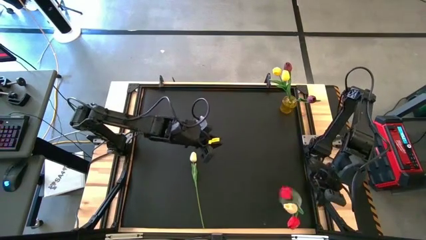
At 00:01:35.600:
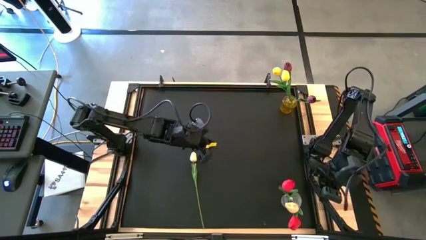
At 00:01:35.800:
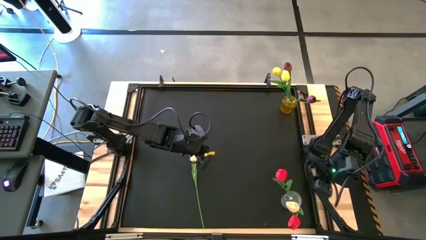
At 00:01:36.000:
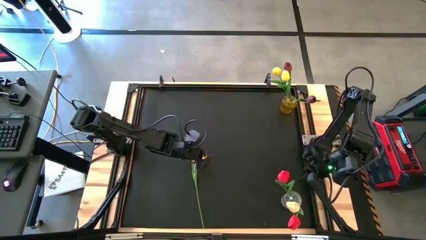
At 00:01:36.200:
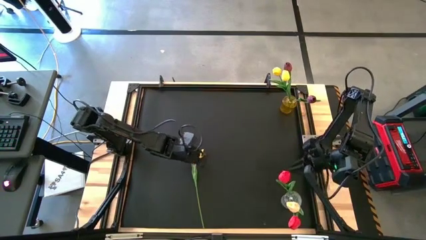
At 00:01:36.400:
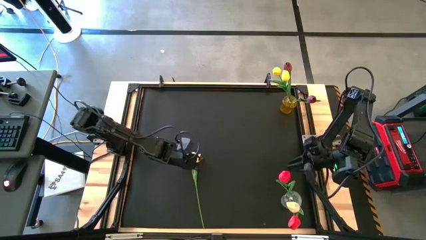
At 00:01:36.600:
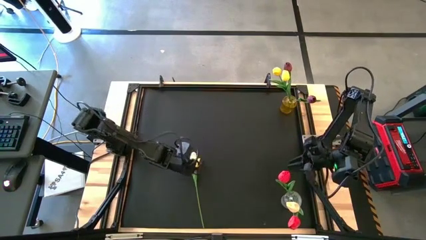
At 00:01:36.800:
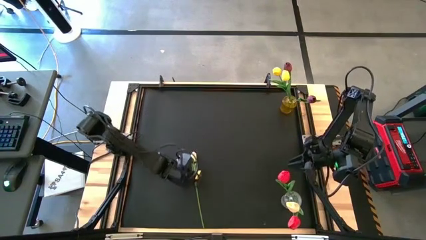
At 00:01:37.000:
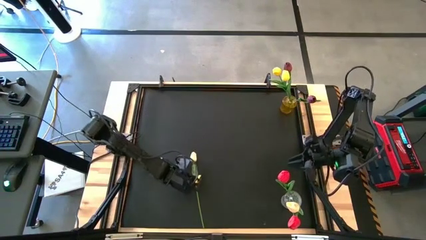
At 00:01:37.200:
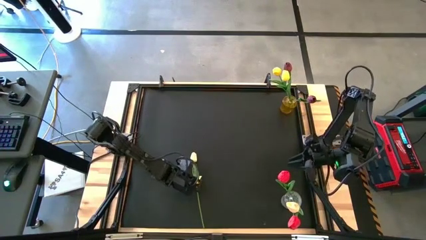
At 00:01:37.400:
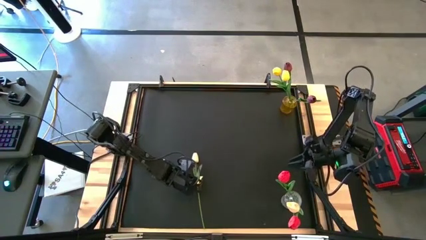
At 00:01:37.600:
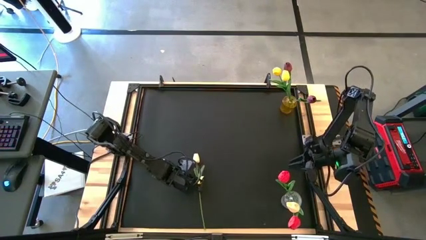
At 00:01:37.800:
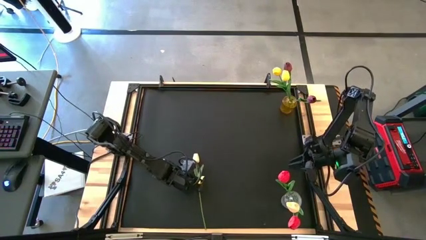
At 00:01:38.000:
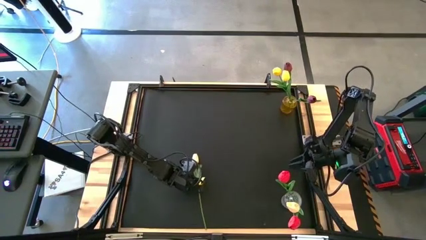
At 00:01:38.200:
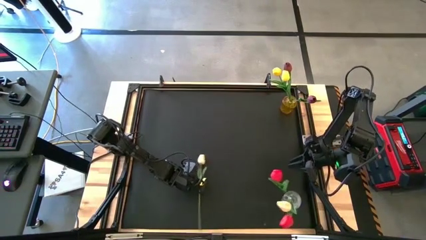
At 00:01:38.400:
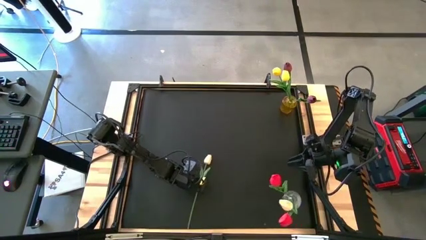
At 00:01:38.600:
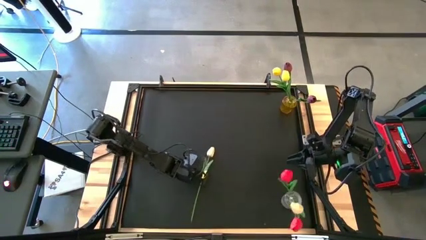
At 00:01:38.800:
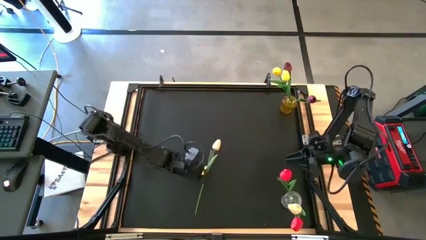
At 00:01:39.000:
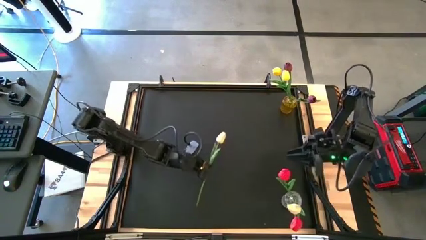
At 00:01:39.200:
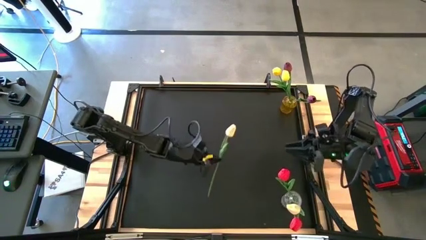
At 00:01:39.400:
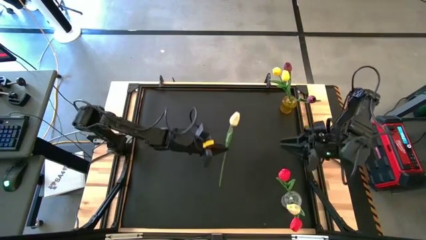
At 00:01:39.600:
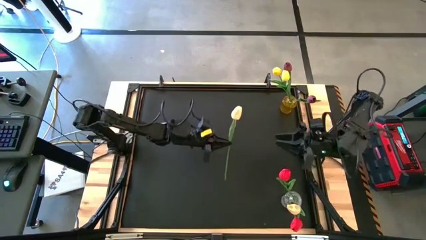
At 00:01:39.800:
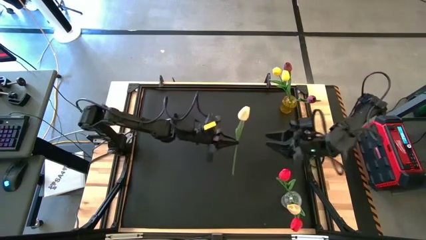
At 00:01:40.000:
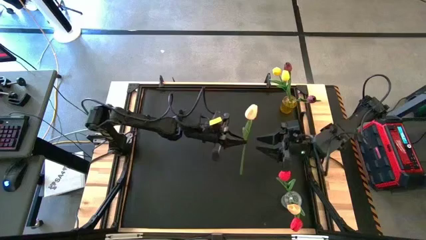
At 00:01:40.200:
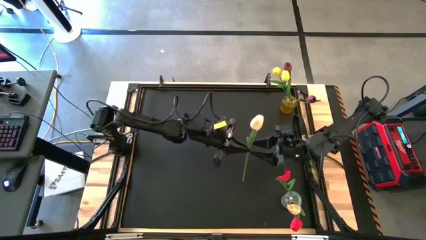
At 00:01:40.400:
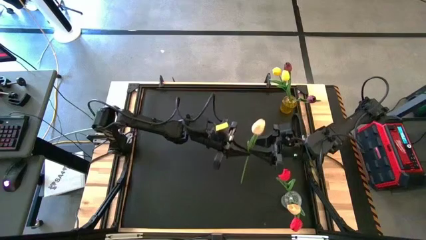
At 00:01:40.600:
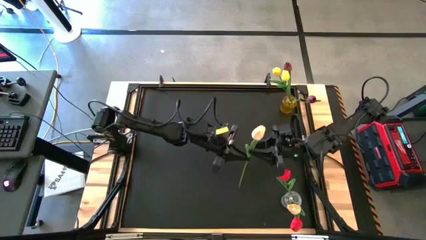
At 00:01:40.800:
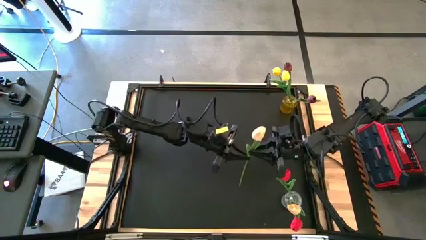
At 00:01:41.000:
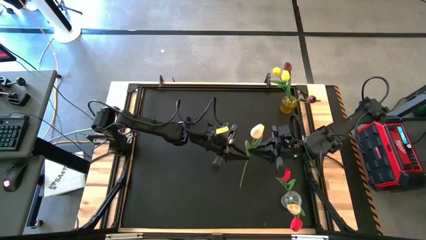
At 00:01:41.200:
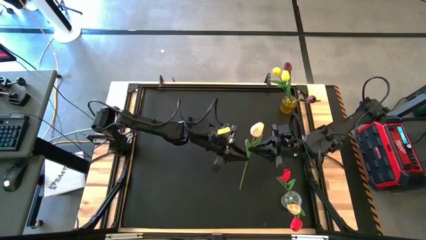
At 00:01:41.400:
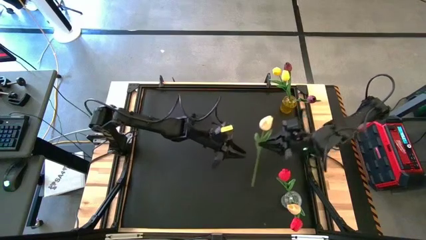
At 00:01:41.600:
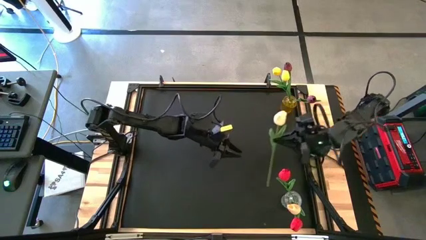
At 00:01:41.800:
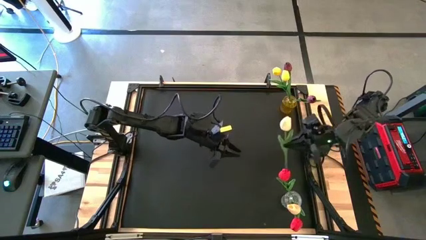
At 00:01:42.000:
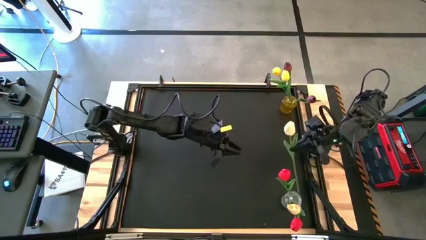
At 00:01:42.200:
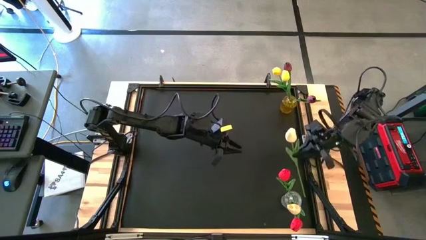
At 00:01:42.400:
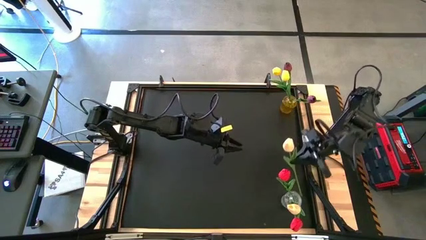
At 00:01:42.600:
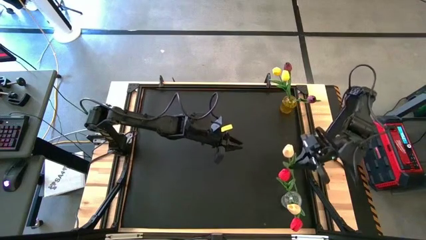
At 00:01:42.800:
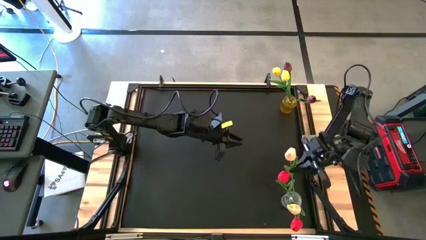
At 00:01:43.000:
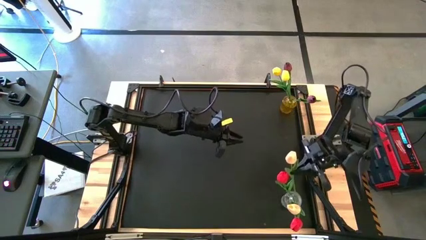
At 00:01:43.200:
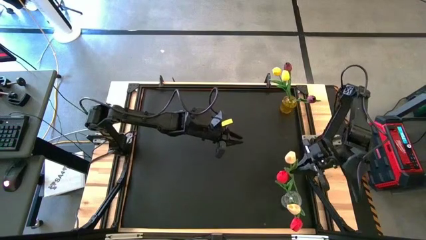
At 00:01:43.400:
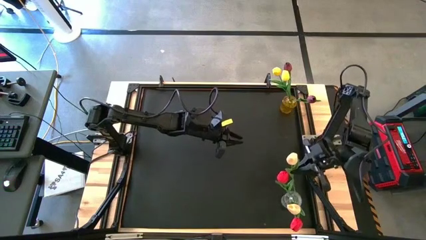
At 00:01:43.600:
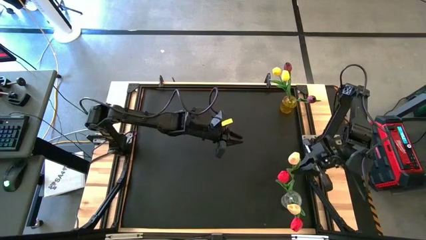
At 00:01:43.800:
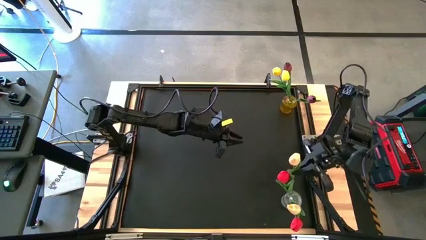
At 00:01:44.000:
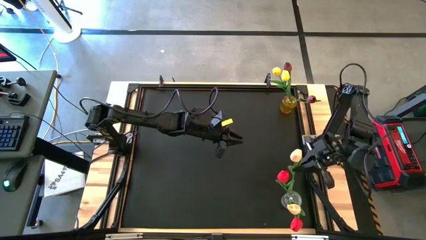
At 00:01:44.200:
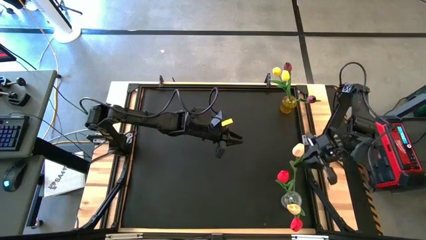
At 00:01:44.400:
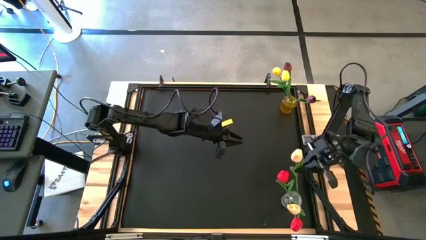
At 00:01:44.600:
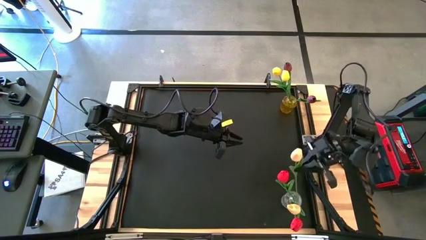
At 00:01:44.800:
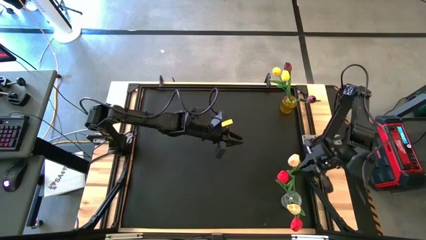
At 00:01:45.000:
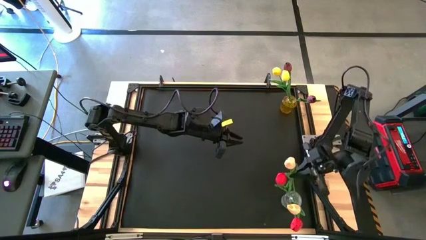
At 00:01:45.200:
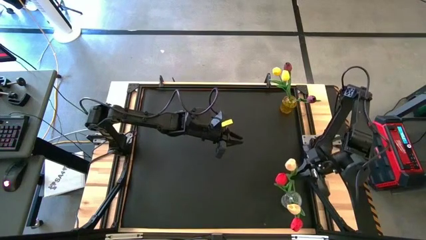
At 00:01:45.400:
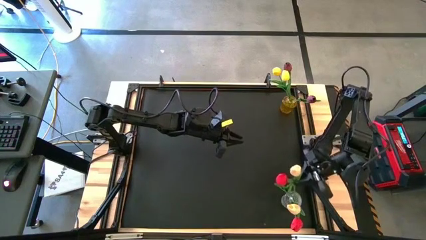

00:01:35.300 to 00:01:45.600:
Task: Sort flowers into vase by color
Put the white flower into the transparent vase

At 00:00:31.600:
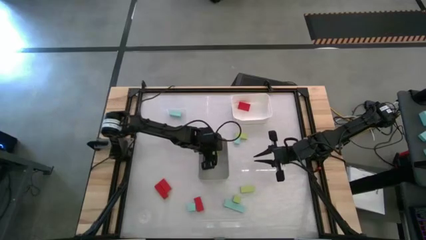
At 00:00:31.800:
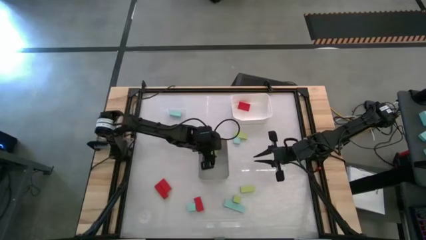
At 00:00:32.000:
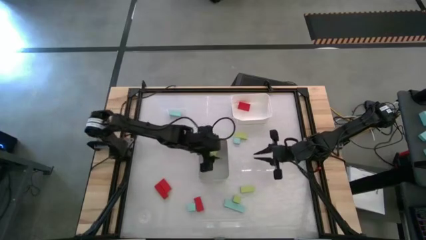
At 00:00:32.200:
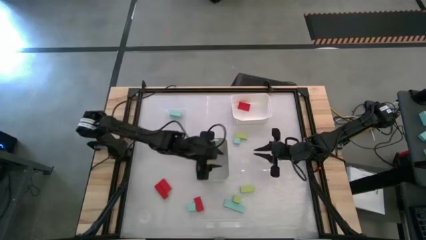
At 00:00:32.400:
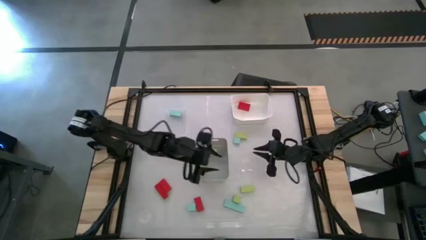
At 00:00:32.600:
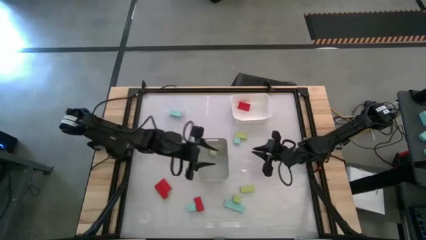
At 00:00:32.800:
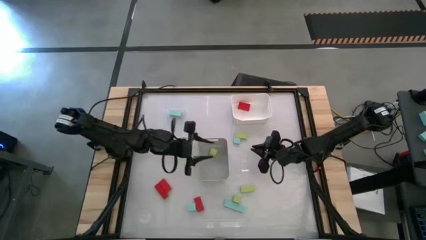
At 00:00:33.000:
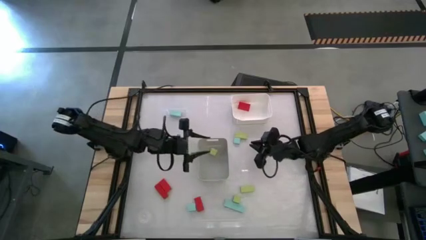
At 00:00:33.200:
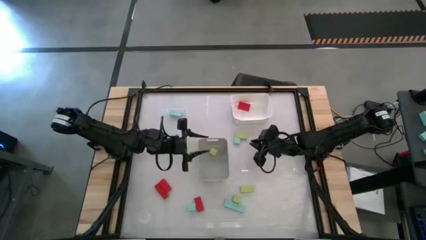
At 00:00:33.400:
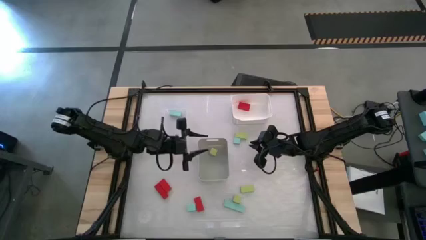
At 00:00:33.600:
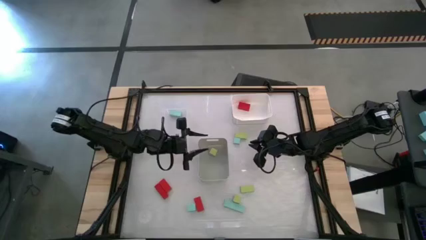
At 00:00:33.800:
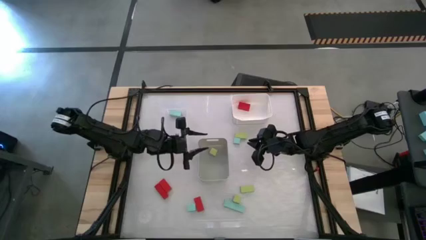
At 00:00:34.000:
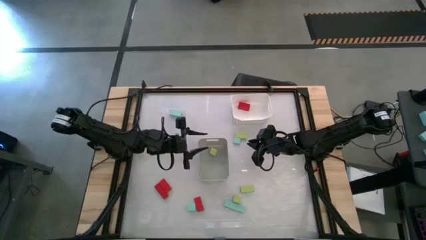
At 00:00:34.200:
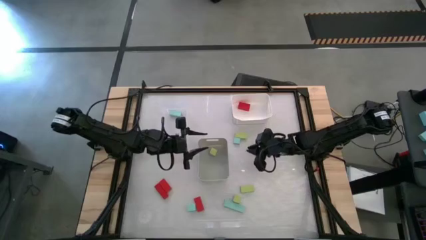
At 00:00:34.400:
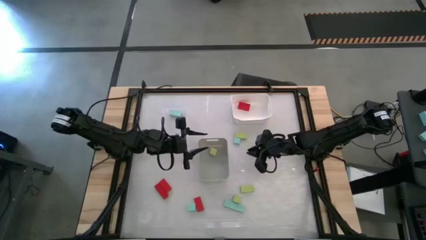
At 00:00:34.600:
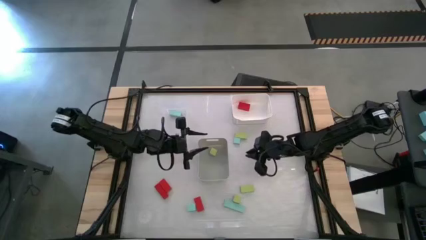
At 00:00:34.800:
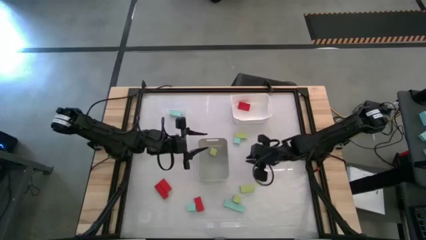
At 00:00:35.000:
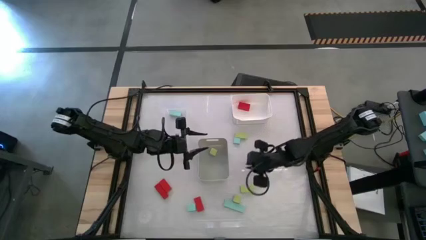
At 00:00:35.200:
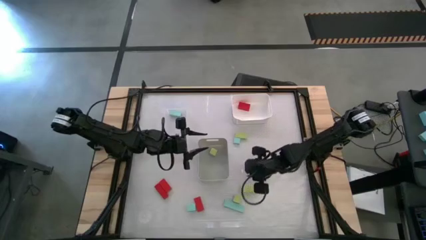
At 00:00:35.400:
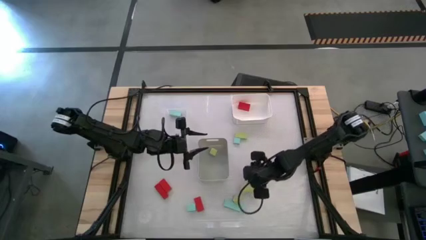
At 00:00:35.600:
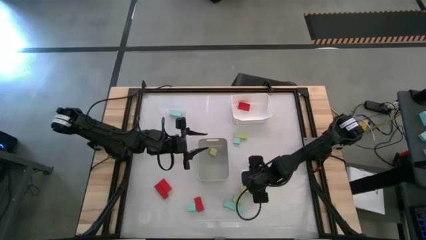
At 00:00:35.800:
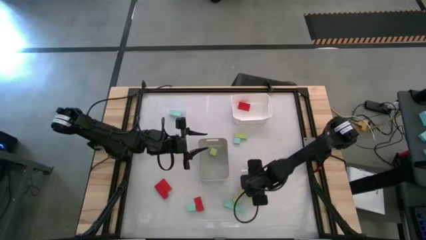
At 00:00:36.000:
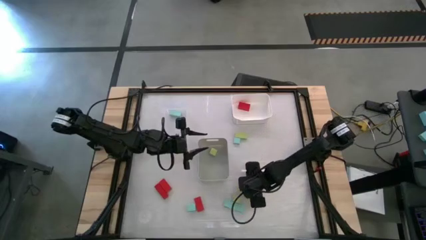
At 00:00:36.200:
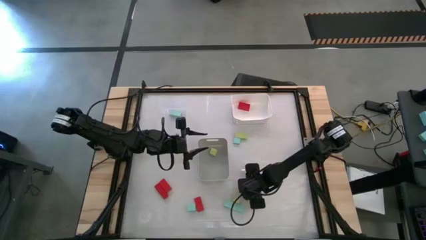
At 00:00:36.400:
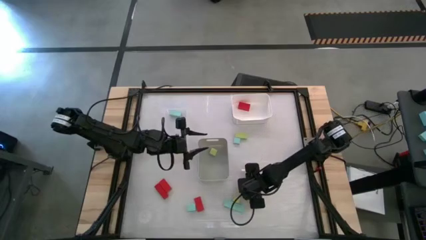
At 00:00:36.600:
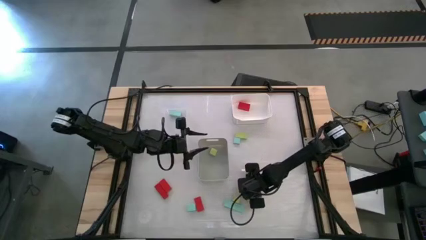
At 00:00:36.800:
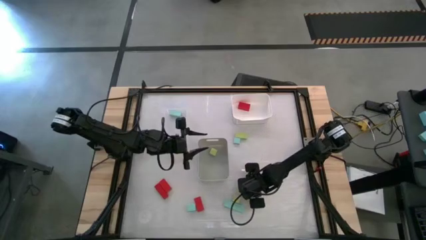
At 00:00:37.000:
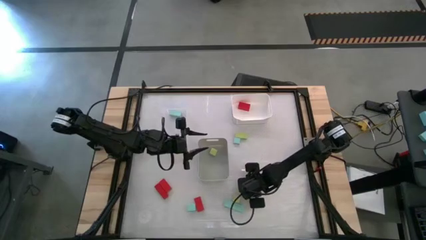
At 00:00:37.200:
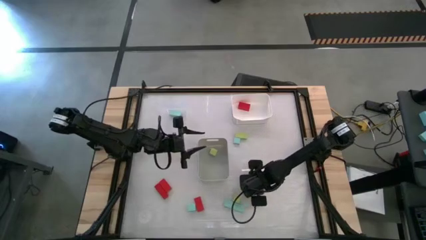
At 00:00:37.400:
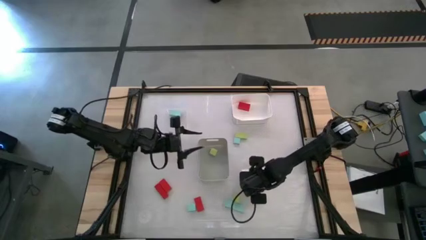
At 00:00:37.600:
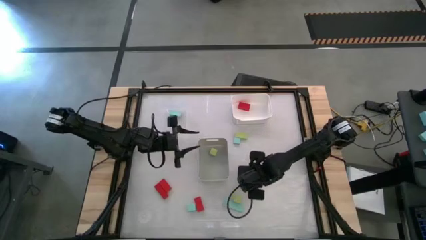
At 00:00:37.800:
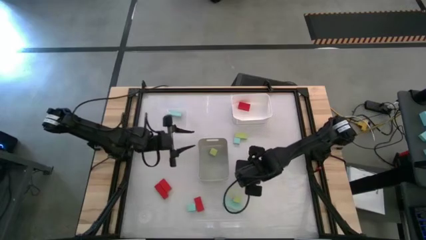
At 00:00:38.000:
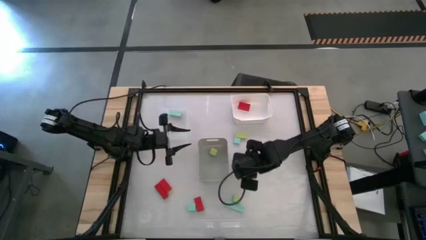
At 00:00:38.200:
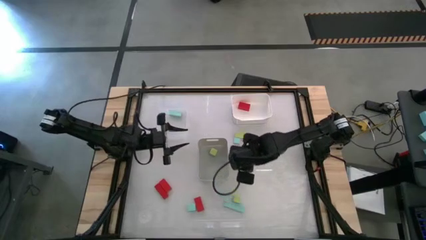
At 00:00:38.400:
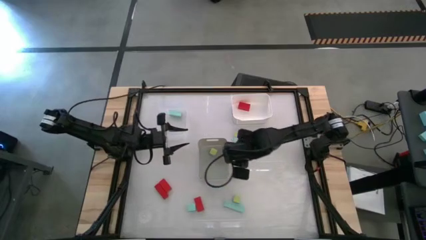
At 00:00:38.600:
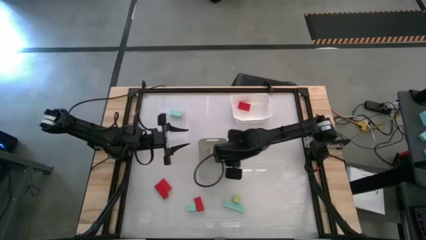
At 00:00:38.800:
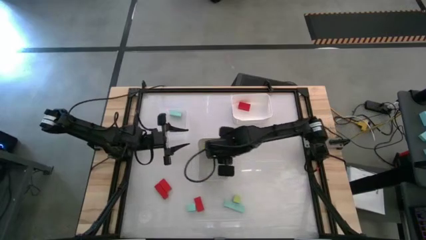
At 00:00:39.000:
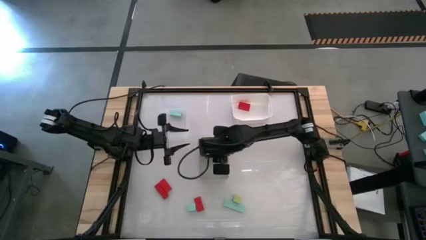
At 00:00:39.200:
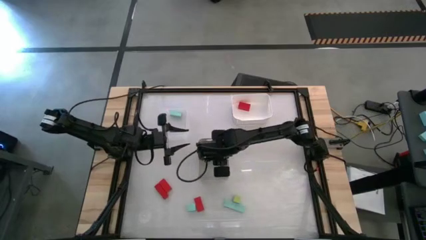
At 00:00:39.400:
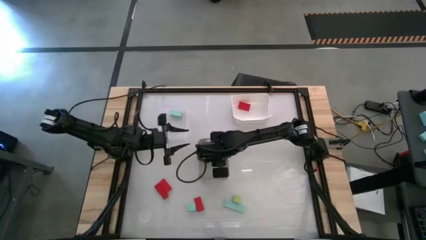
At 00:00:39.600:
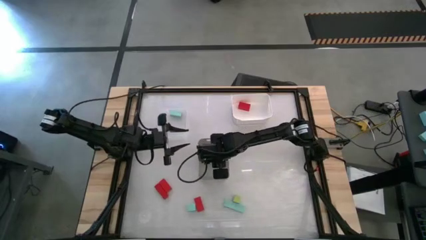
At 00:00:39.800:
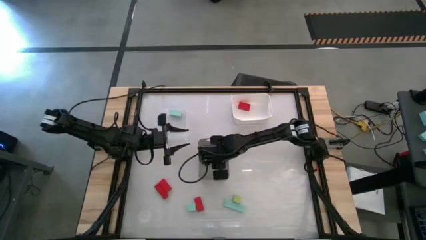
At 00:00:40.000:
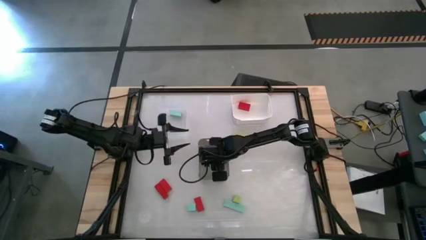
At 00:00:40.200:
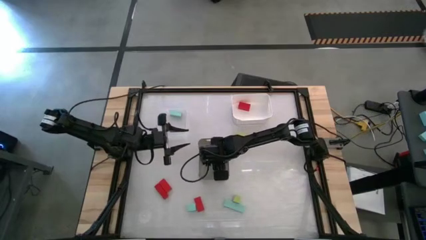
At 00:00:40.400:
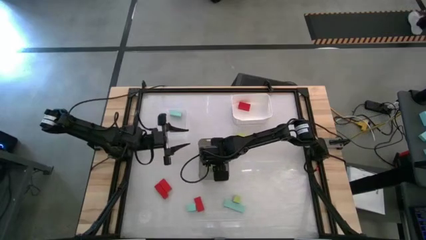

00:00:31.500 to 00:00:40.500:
Task: Sort & place blocks by color
Put the green block into the gray bin
